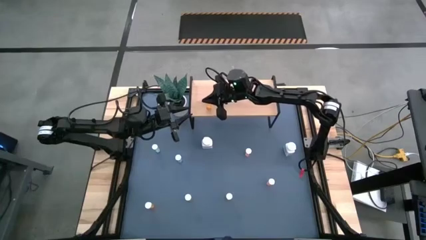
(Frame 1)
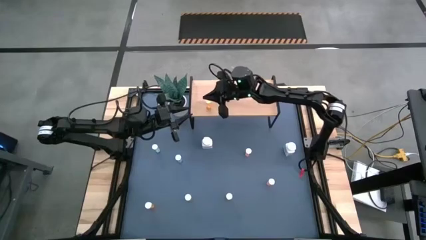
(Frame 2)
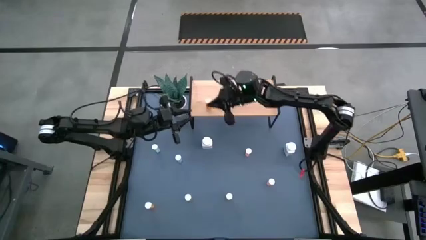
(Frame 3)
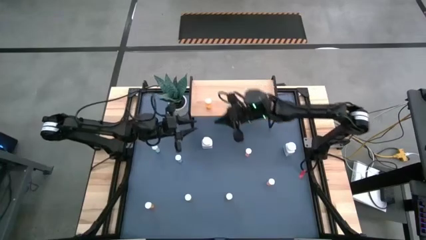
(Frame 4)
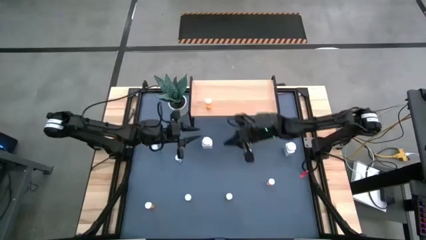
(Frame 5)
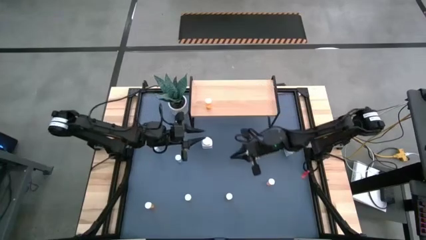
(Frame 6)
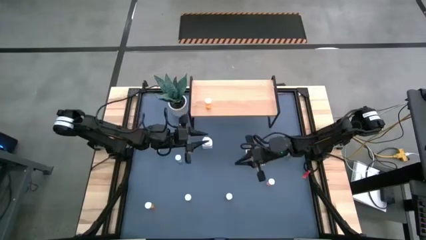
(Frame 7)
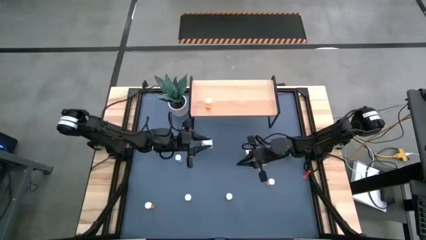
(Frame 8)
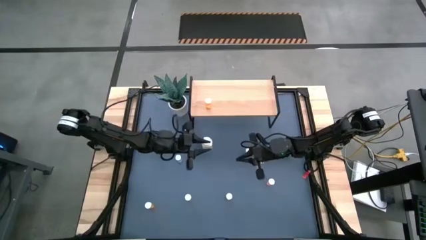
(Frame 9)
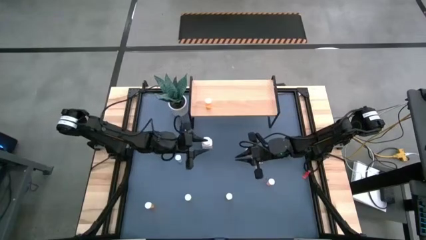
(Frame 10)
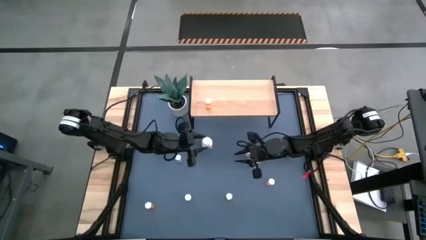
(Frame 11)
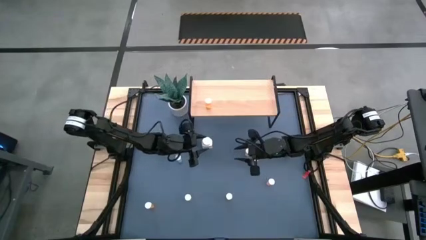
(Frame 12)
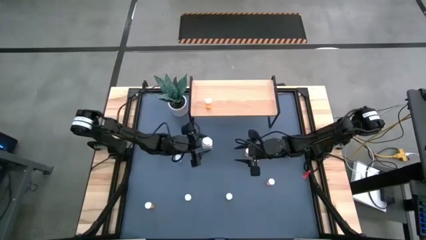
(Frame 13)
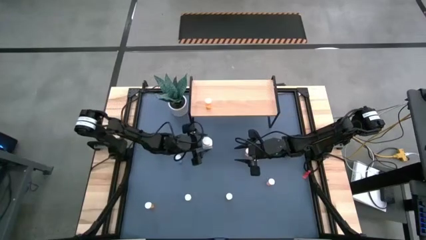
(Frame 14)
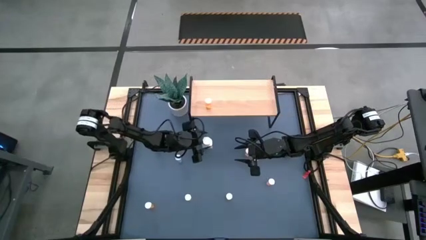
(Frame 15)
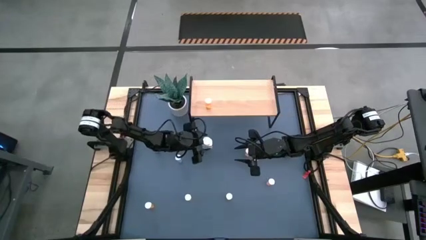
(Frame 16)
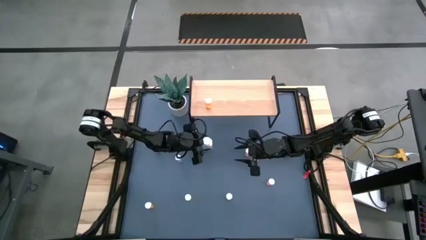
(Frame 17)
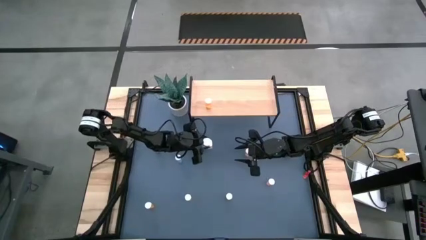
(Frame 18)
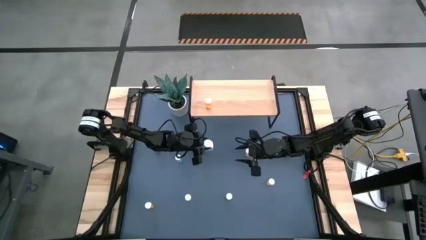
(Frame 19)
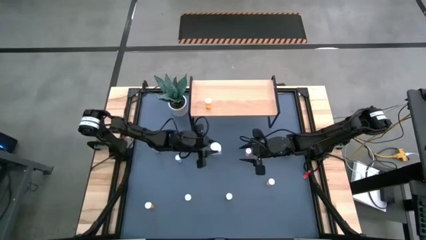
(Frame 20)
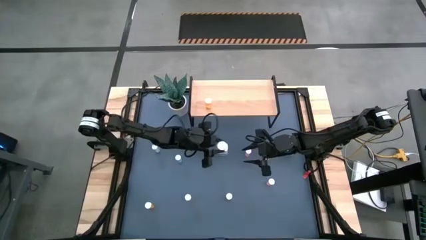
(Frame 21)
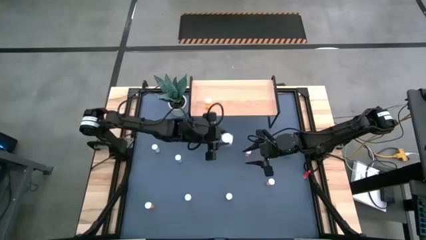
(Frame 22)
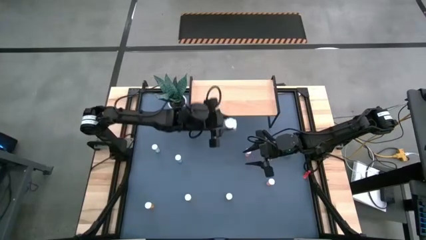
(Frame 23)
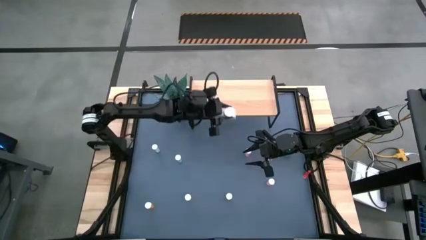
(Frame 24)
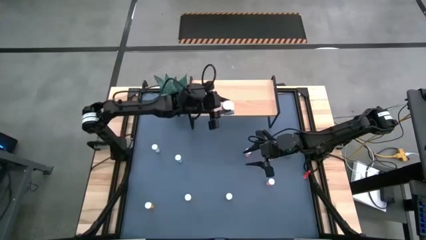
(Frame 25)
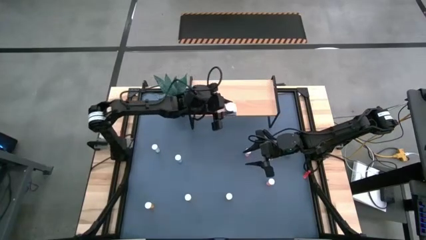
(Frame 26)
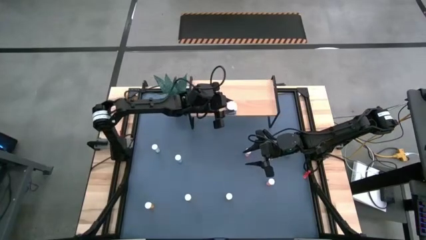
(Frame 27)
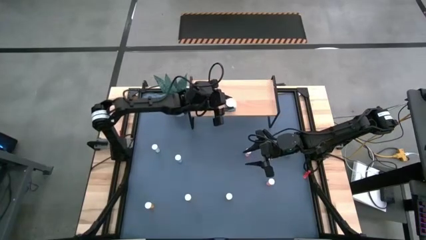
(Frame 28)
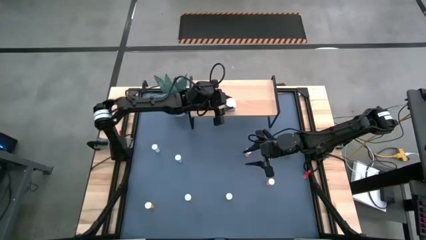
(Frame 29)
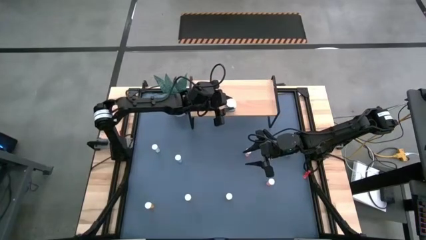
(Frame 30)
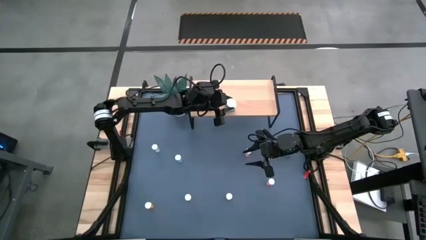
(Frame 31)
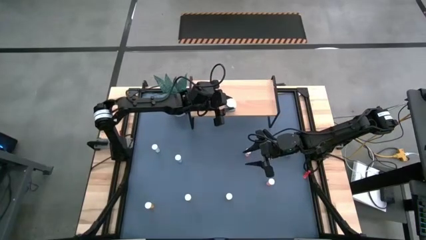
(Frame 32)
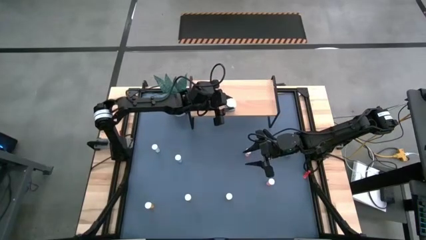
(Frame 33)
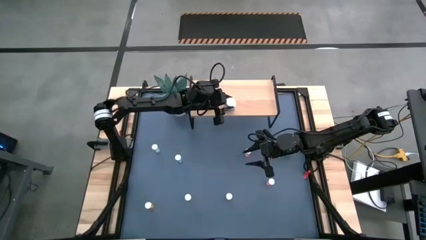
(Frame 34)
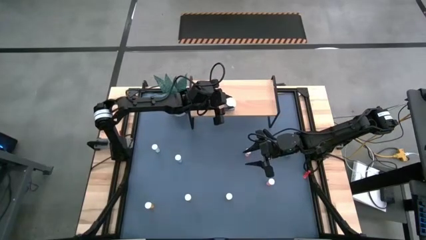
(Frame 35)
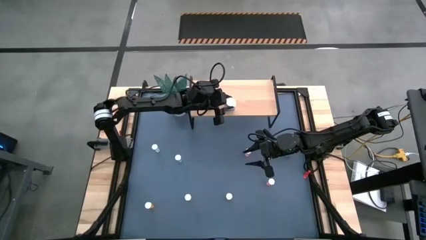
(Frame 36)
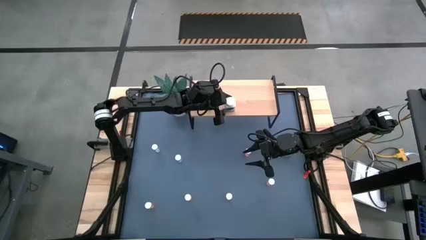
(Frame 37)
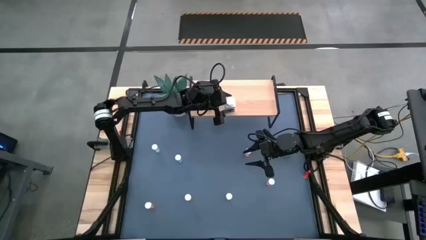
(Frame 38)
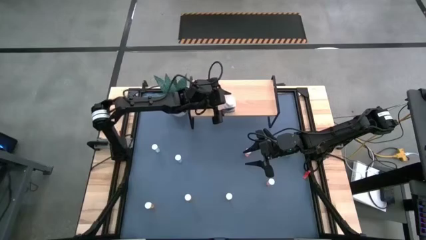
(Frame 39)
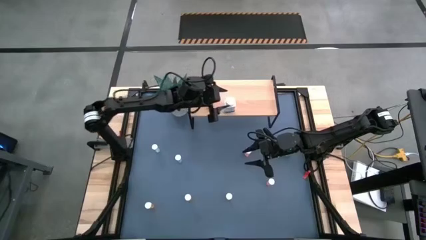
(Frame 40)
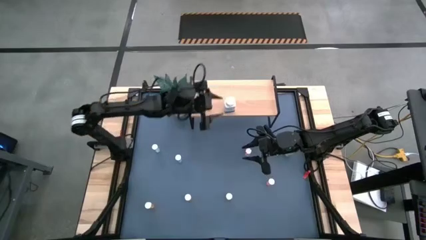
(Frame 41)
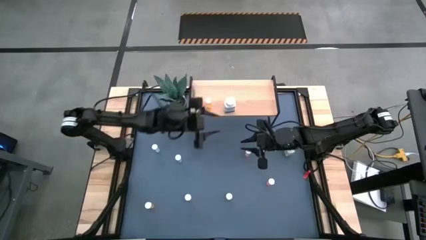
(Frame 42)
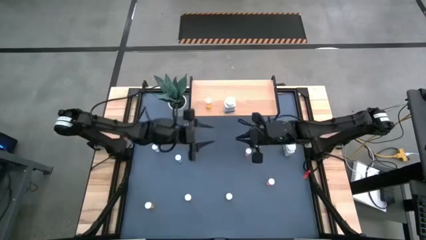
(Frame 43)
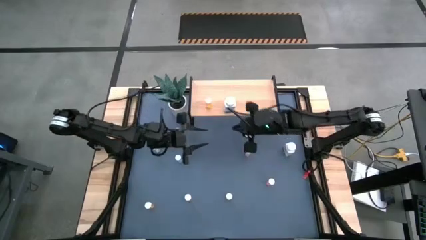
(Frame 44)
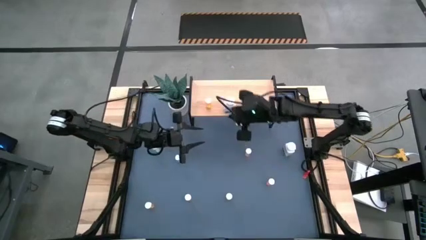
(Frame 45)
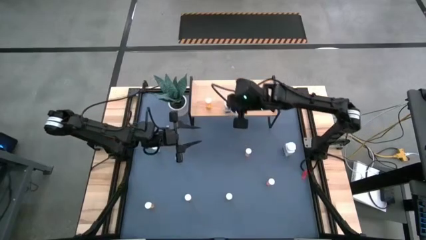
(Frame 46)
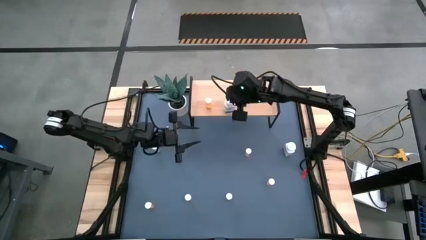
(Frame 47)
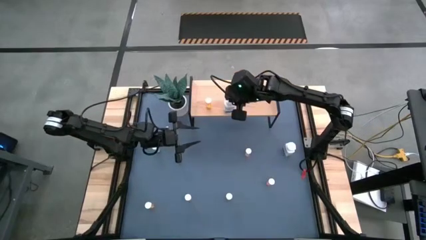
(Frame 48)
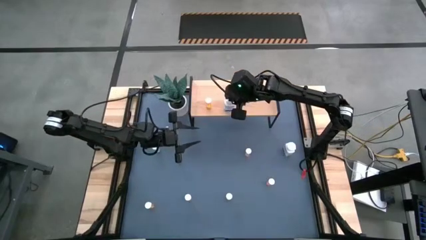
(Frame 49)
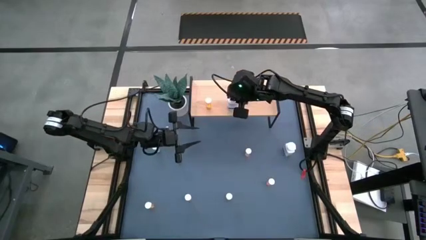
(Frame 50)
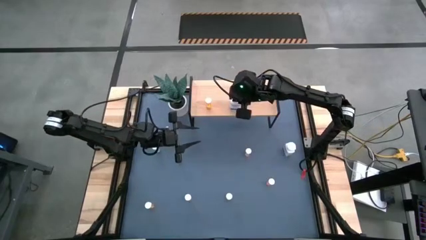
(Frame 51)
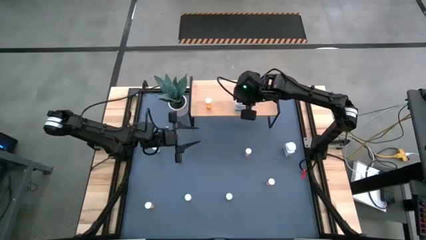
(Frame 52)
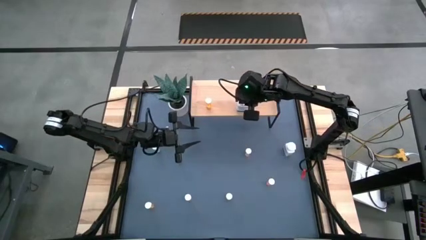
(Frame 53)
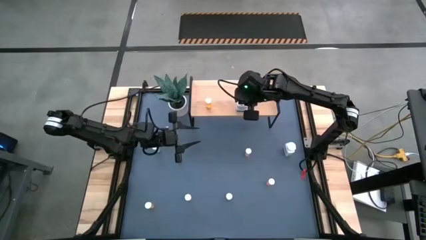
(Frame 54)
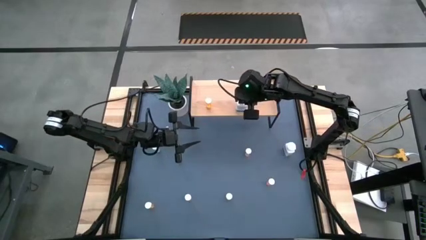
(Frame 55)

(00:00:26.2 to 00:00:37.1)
Task: Pick and place medicine bottles onto shelf by color
Put the left white medicine bottle on the shelf

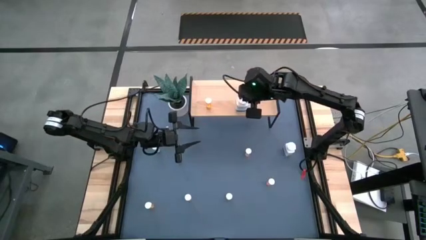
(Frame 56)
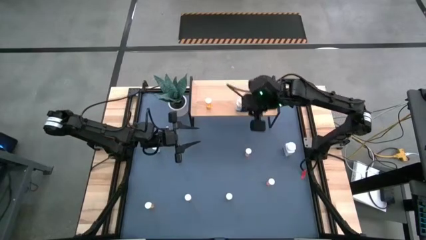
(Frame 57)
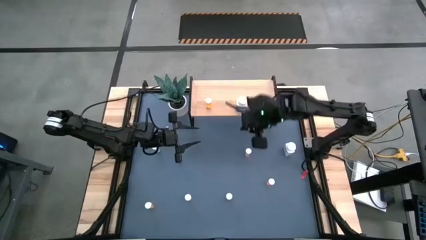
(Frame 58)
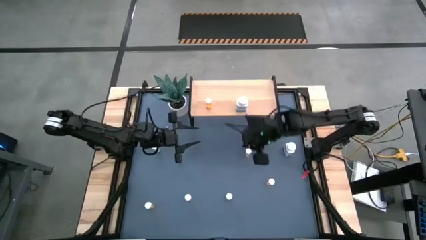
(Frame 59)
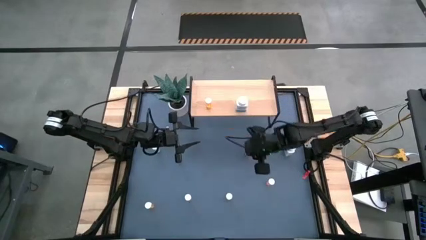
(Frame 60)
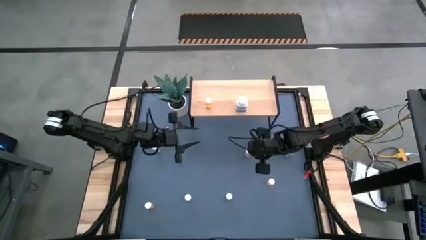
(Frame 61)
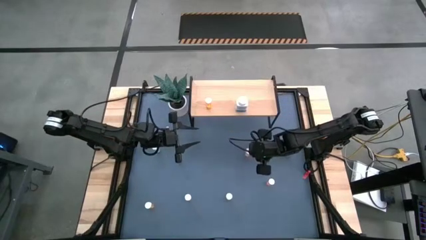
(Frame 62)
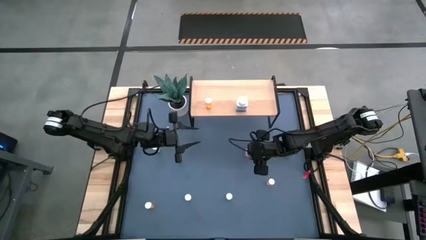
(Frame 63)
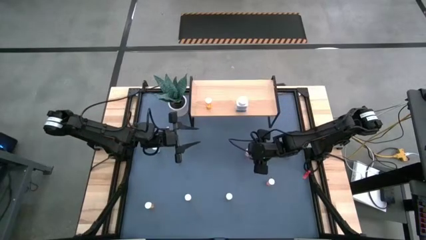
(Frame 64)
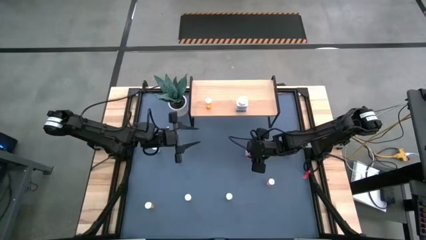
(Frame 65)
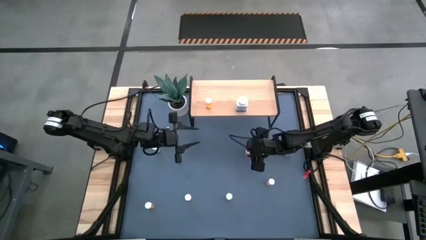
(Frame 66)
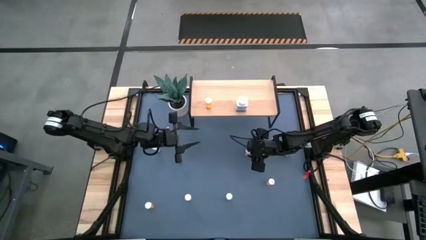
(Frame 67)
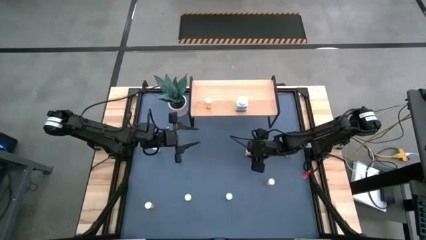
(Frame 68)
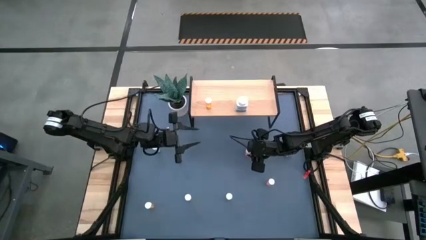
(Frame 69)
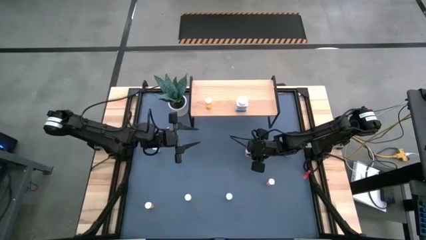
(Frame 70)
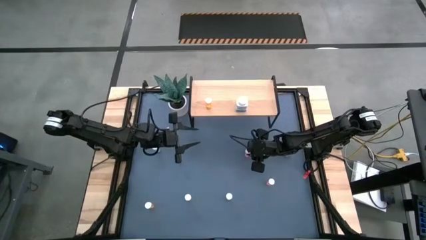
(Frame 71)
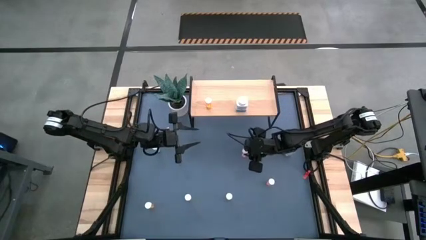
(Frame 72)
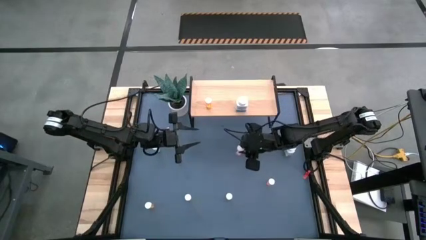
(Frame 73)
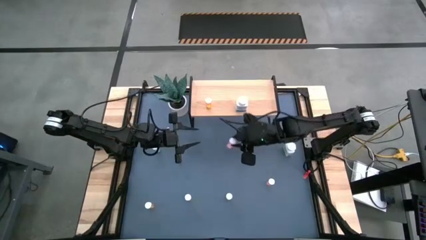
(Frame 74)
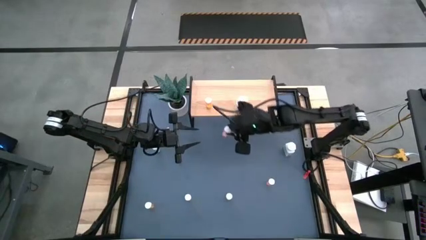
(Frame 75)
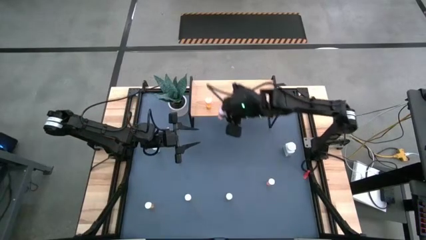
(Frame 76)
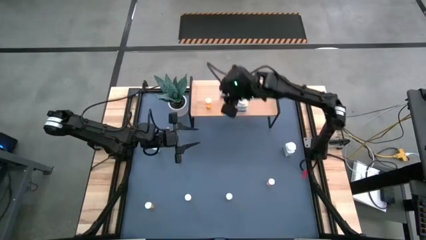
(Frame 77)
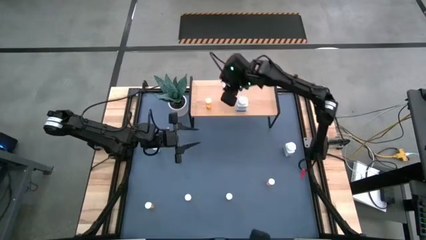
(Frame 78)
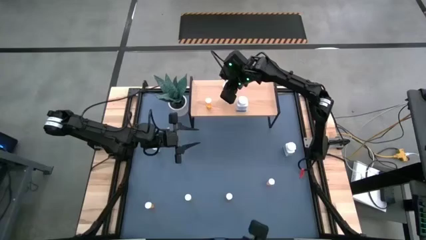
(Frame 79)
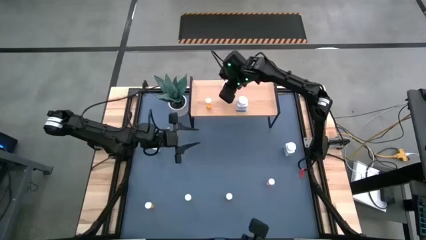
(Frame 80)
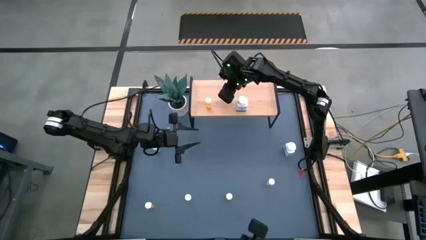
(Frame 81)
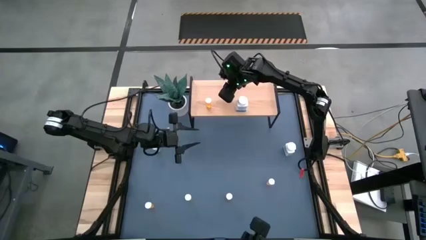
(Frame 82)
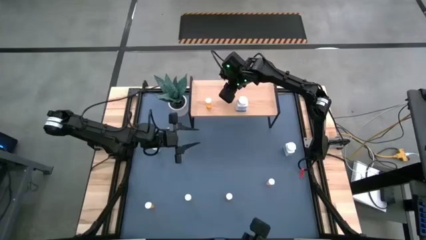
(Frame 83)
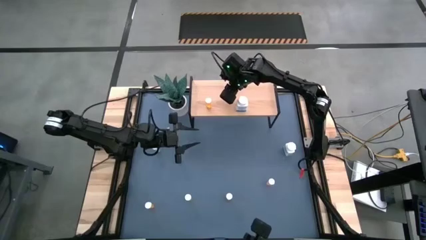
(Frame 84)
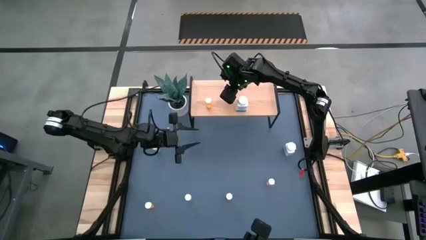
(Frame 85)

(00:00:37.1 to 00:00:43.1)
Put the top pink medicine bottle on the shelf
